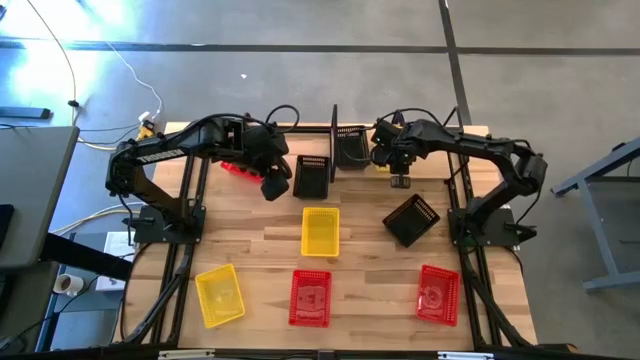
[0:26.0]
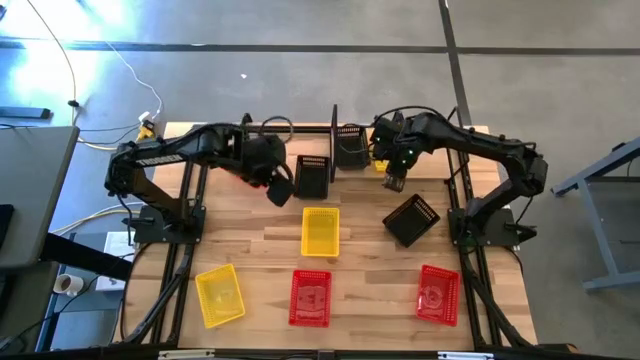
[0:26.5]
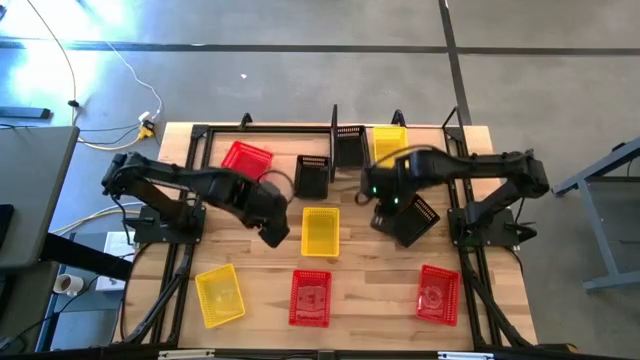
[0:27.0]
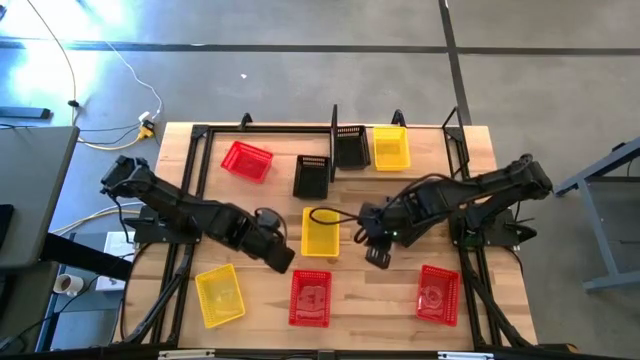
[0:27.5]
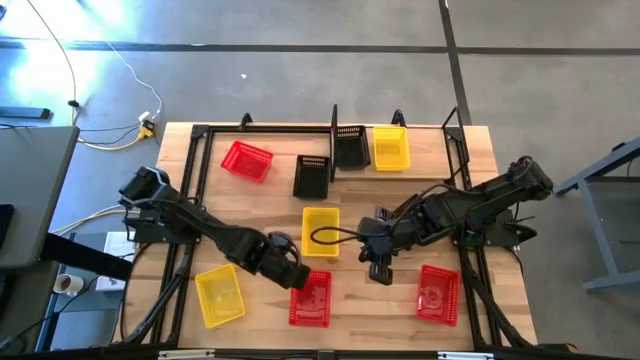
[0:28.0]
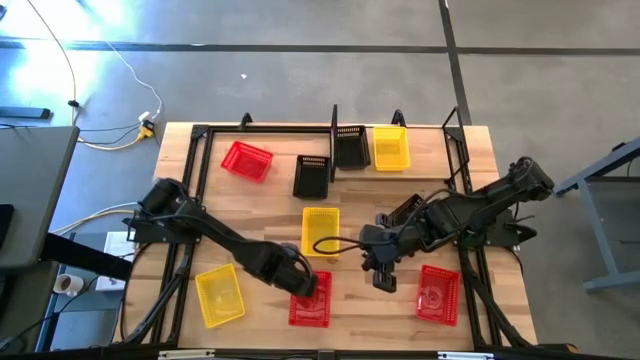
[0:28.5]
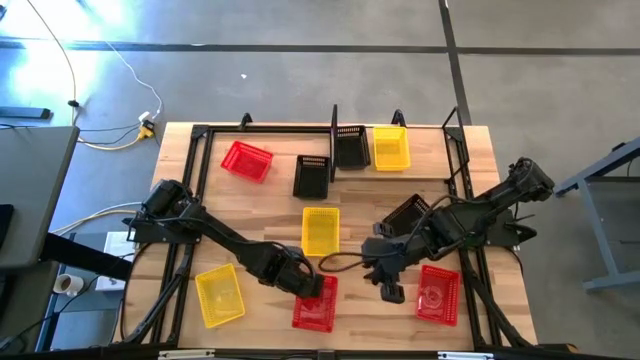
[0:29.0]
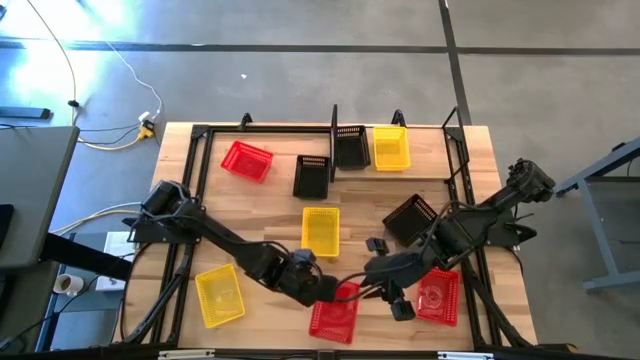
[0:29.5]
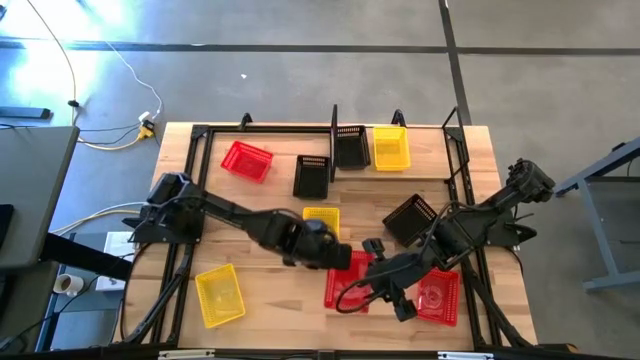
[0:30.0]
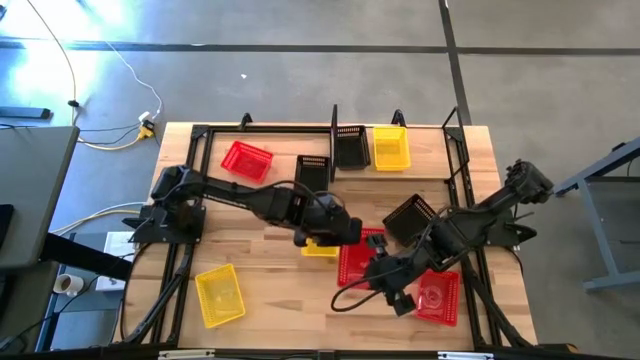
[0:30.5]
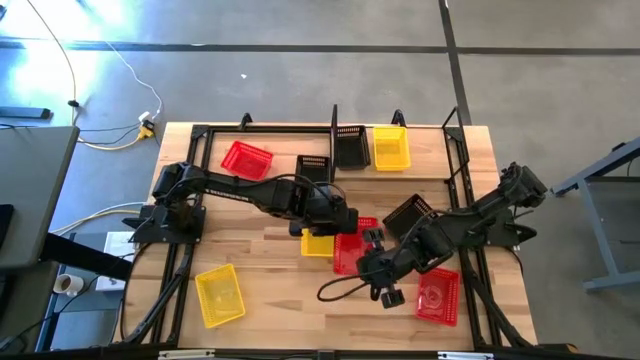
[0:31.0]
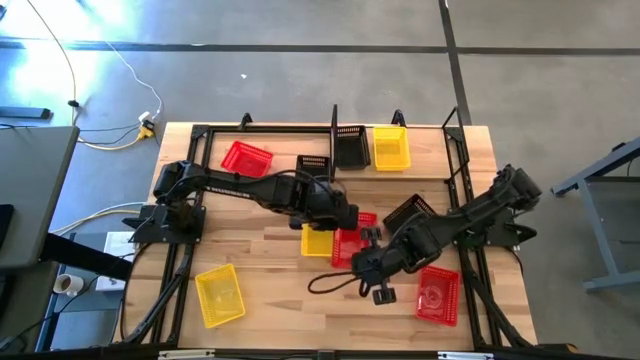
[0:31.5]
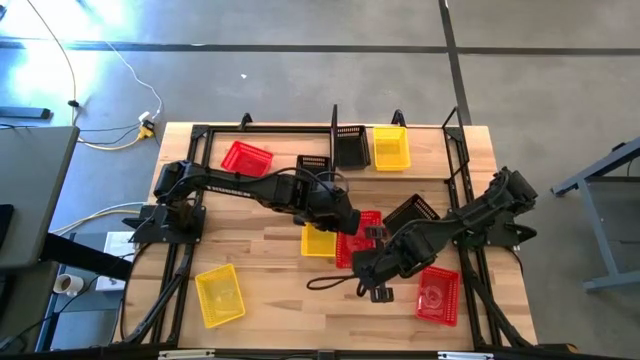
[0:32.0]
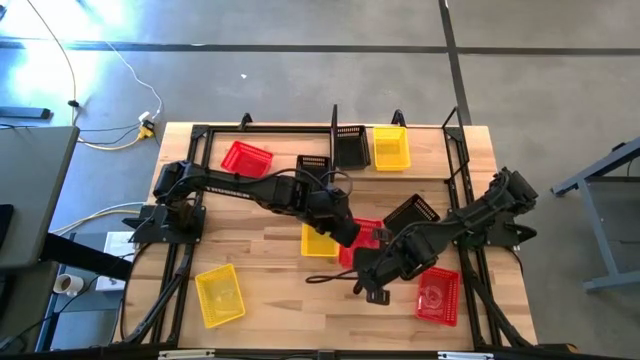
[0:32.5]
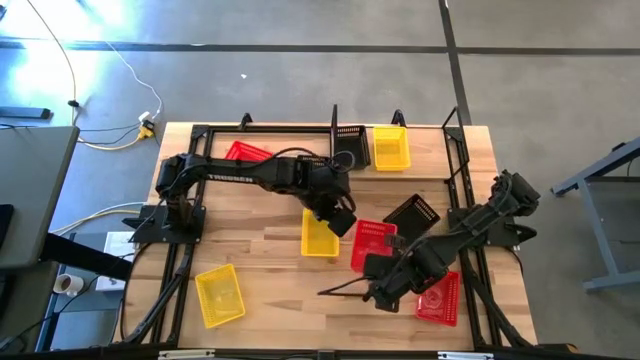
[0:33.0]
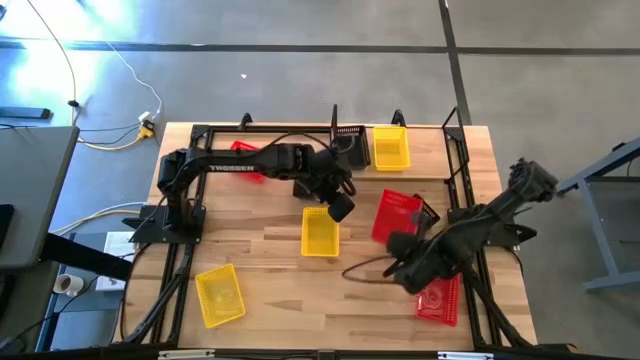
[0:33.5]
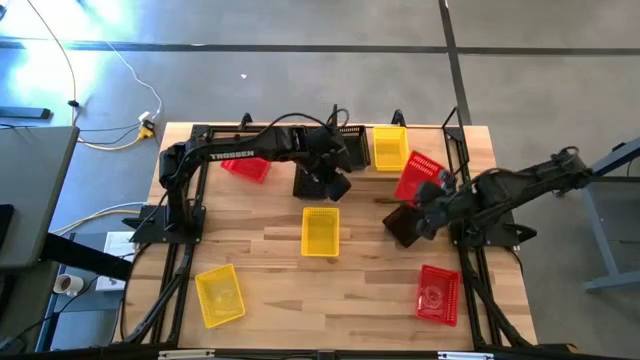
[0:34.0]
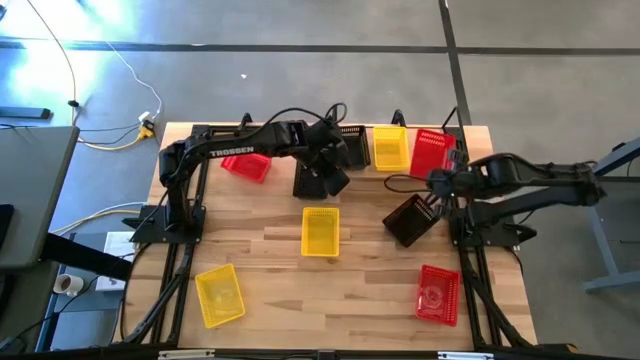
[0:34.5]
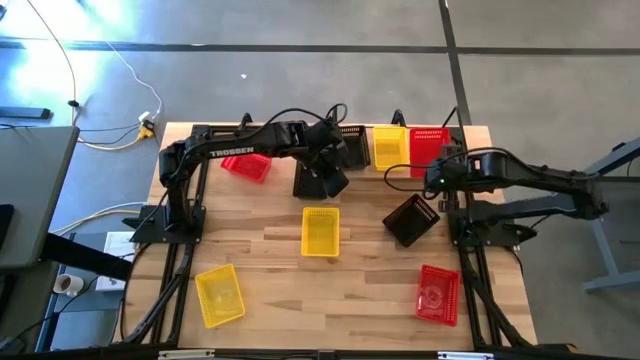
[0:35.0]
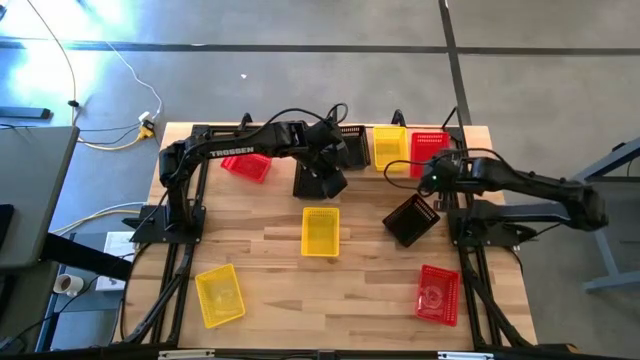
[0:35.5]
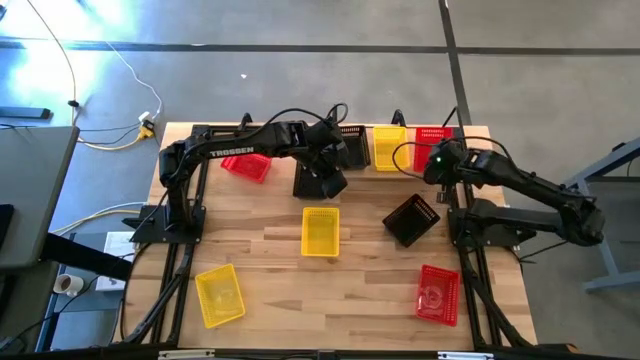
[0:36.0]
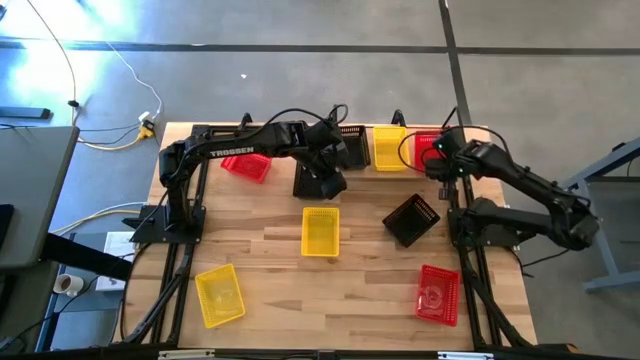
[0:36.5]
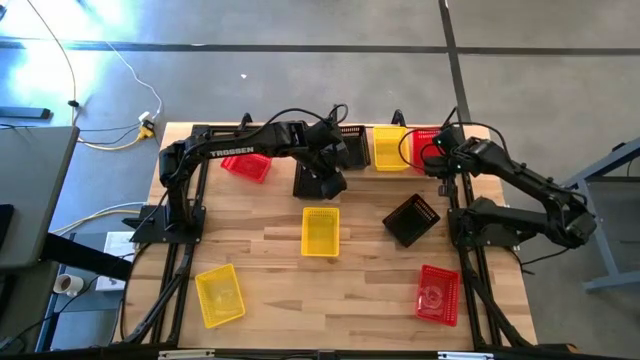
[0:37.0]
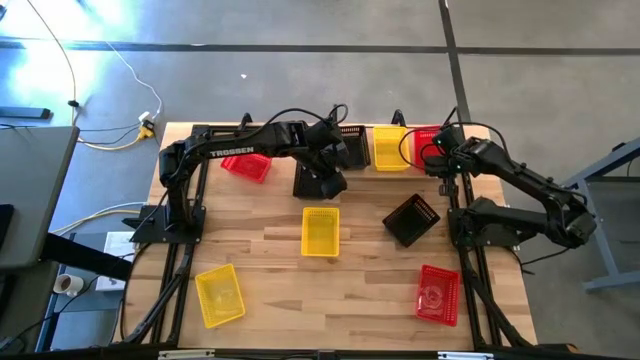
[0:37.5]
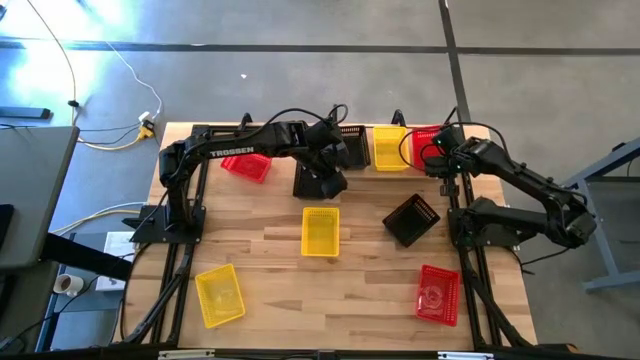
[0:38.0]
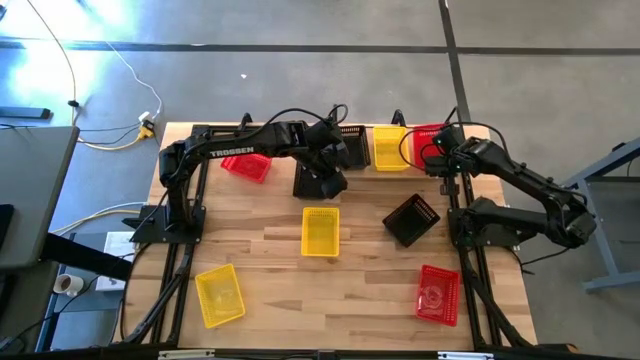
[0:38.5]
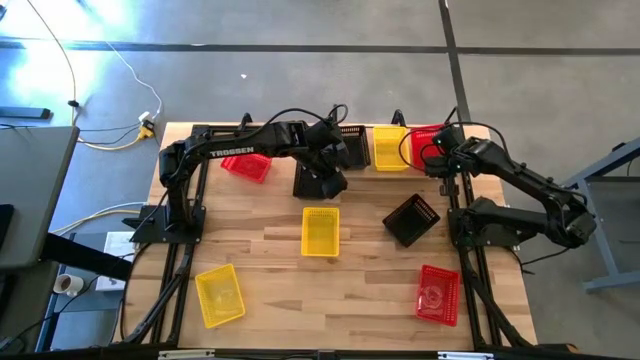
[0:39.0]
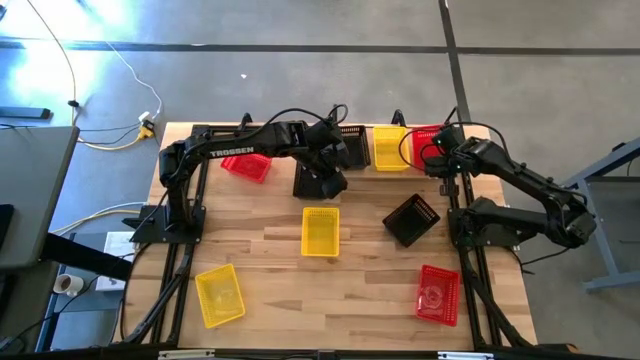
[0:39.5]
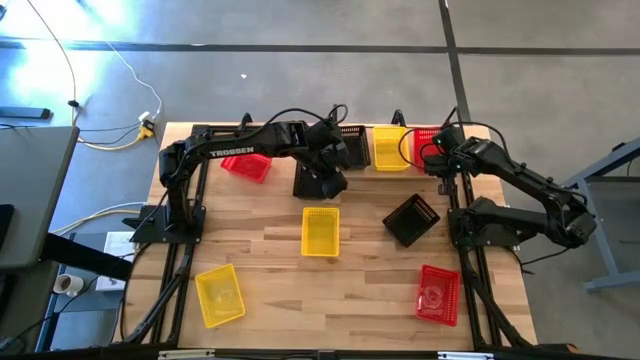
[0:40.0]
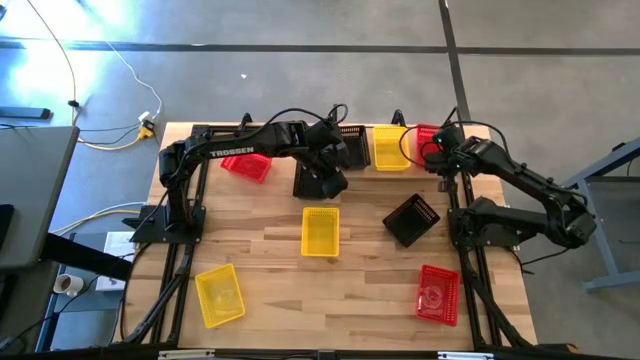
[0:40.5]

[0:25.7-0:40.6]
Task: Stack baskets on shelf by color
Put the bottom left red basket on the shelf

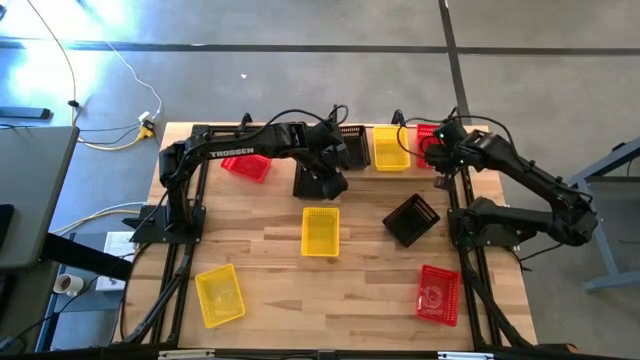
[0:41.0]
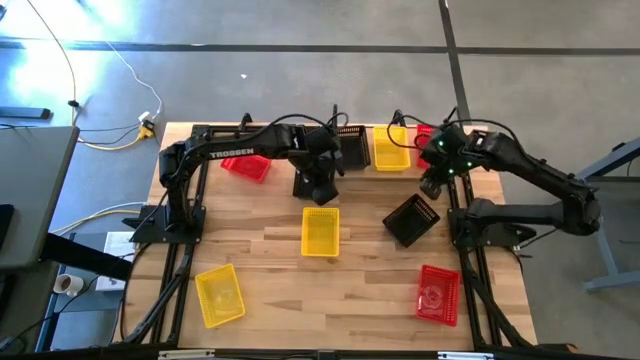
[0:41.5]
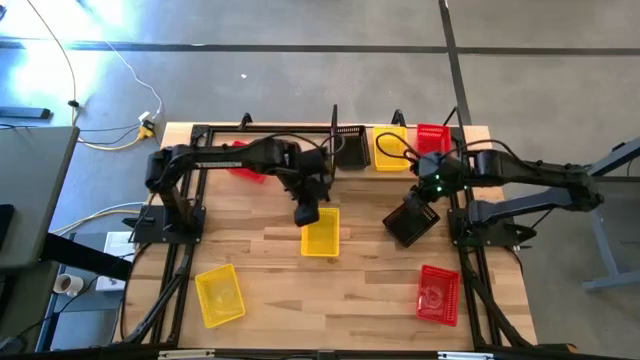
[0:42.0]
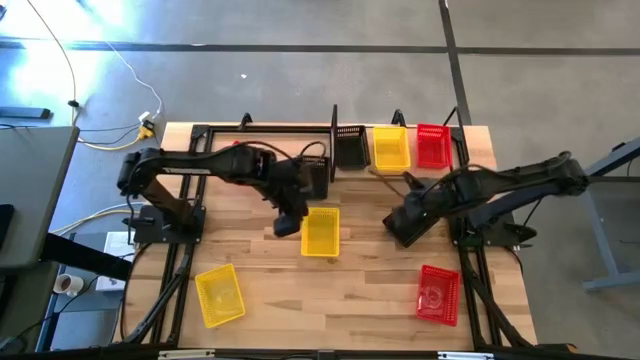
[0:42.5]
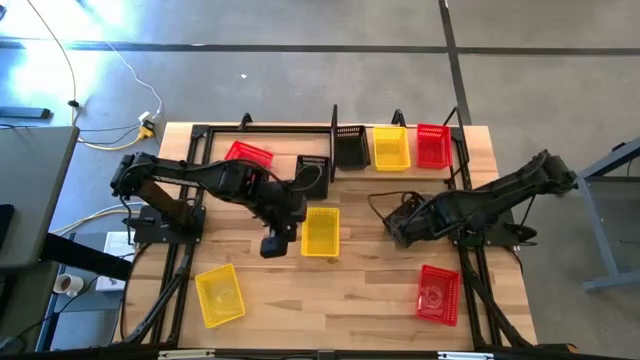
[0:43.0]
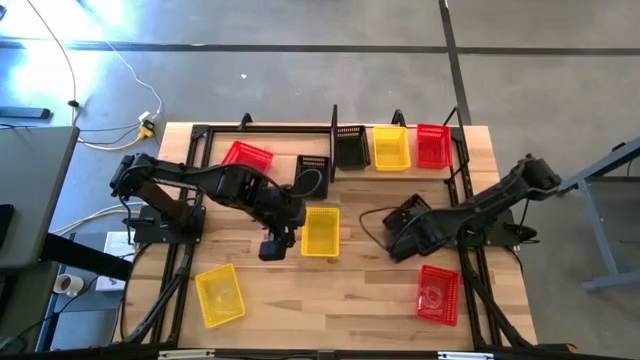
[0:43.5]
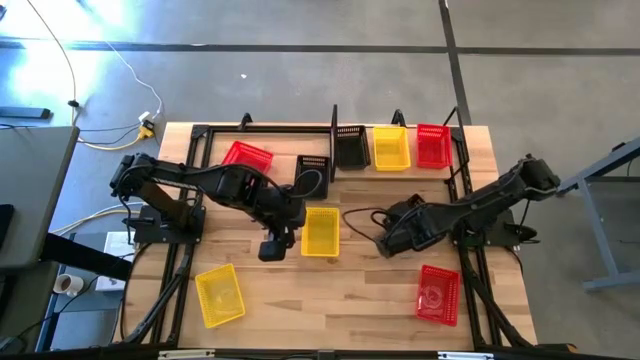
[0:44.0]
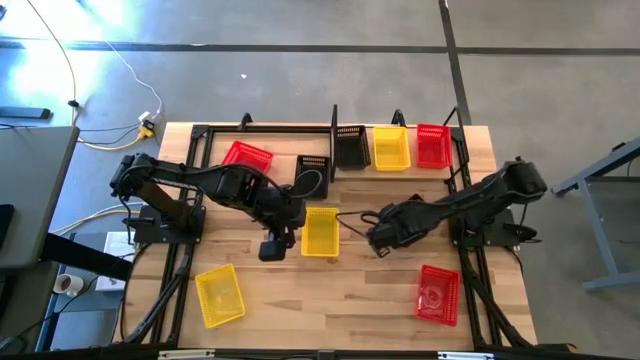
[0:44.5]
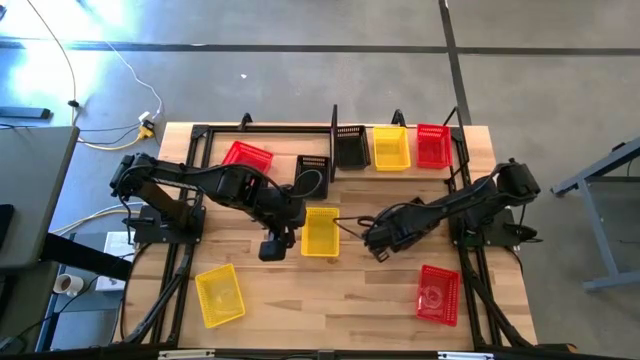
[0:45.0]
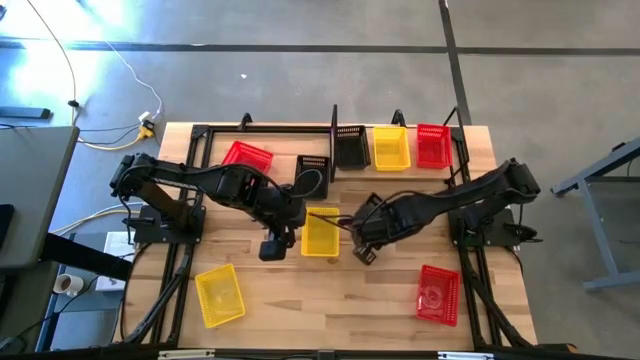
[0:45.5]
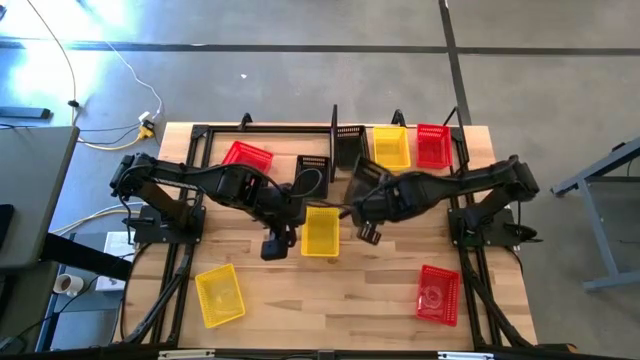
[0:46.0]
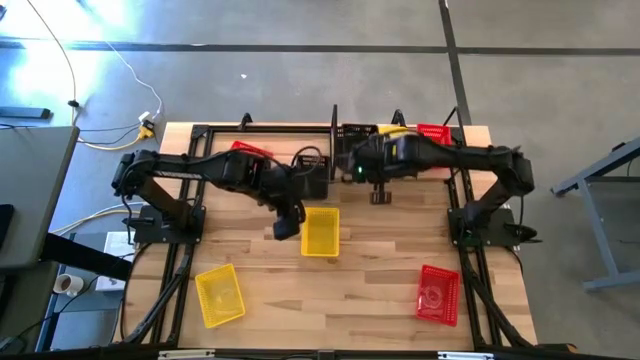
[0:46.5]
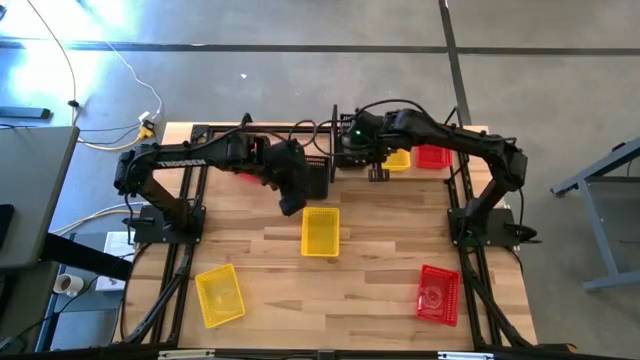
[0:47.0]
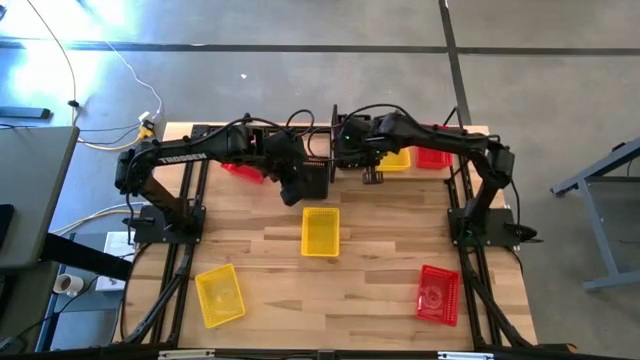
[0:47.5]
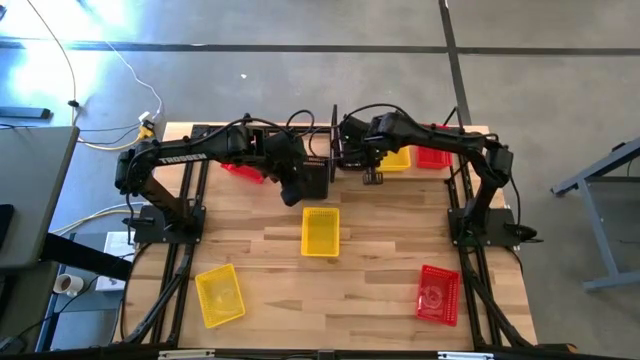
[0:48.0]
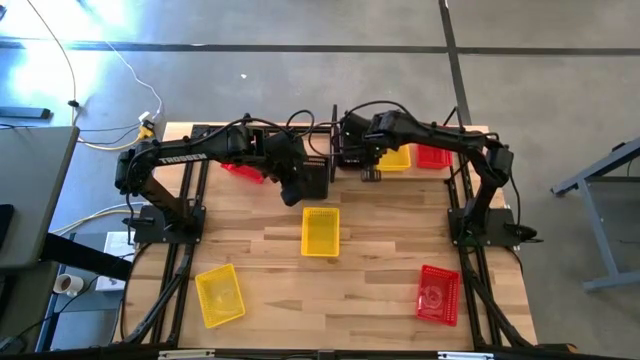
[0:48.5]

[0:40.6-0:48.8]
Stack the right black basket on the black basket on the shelf
